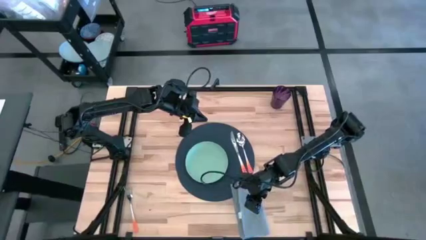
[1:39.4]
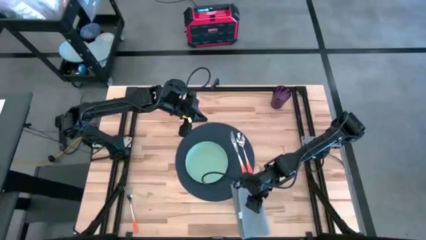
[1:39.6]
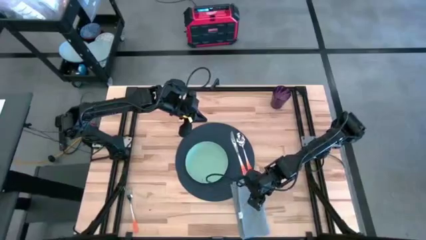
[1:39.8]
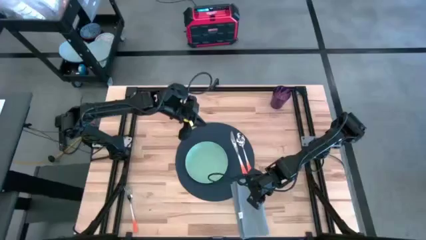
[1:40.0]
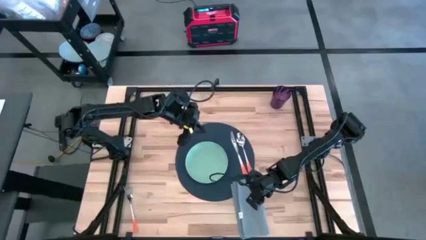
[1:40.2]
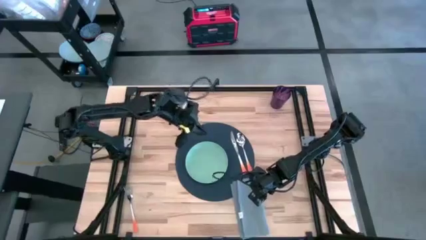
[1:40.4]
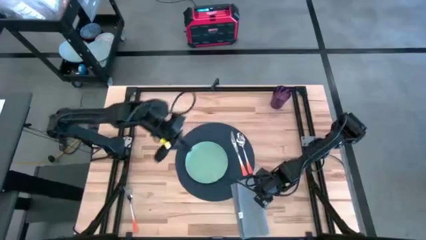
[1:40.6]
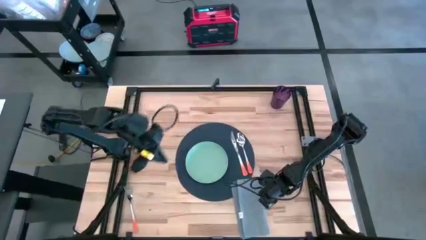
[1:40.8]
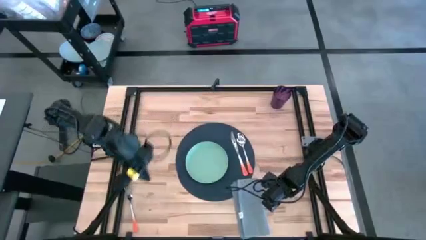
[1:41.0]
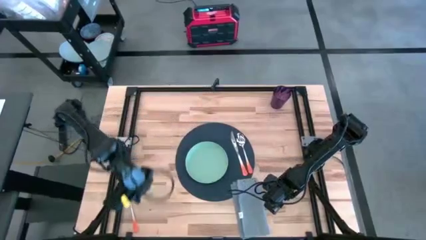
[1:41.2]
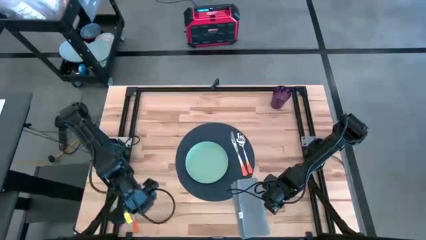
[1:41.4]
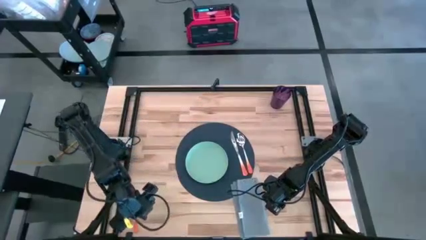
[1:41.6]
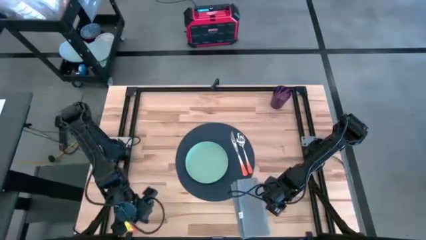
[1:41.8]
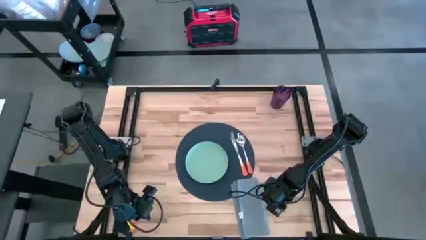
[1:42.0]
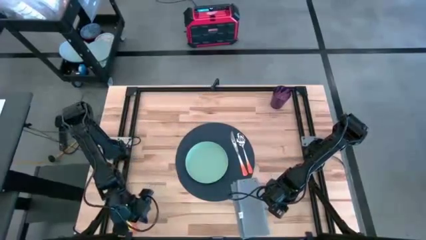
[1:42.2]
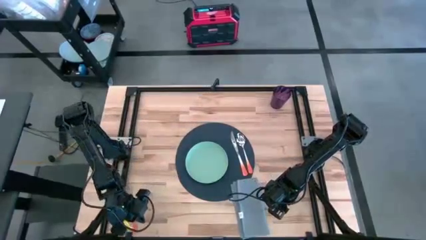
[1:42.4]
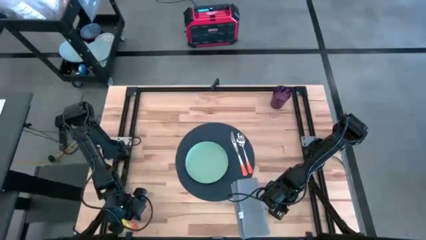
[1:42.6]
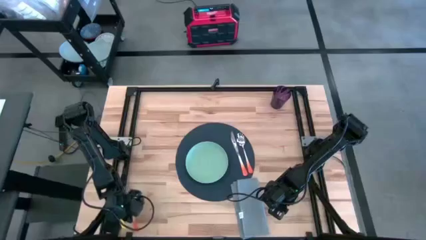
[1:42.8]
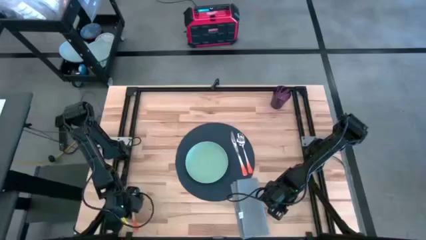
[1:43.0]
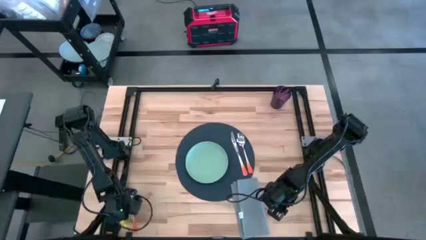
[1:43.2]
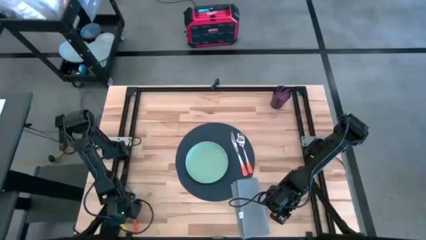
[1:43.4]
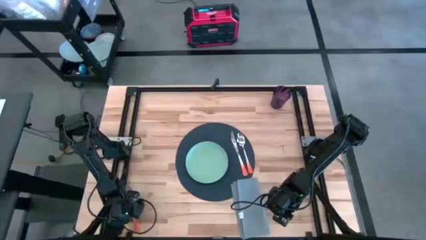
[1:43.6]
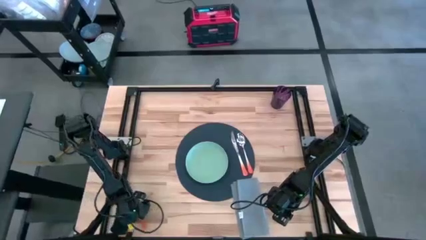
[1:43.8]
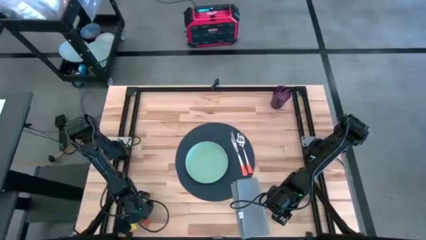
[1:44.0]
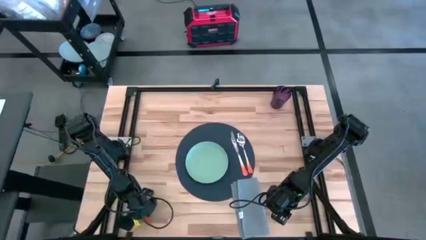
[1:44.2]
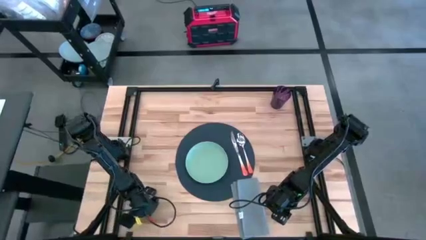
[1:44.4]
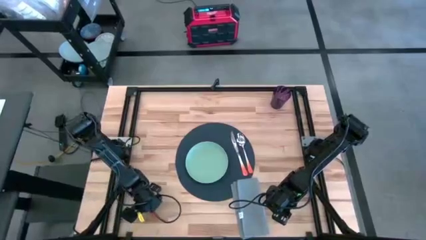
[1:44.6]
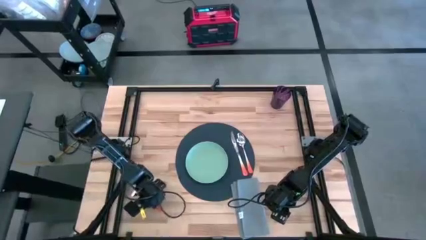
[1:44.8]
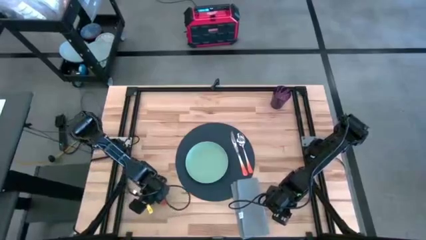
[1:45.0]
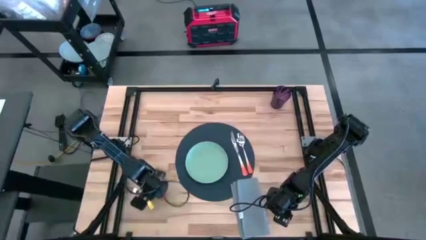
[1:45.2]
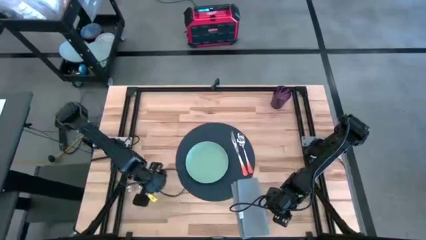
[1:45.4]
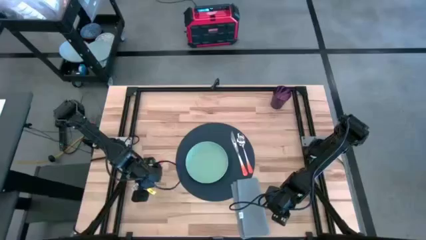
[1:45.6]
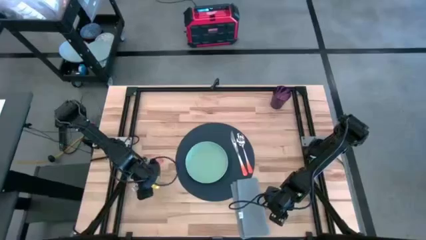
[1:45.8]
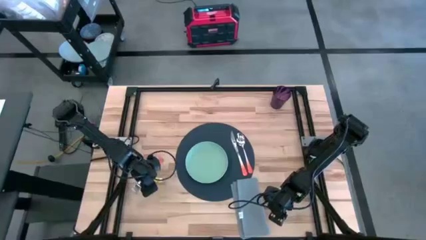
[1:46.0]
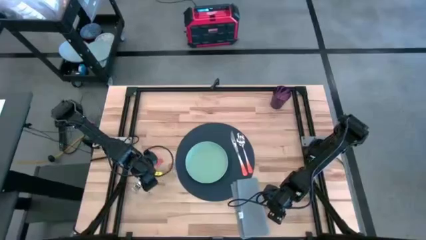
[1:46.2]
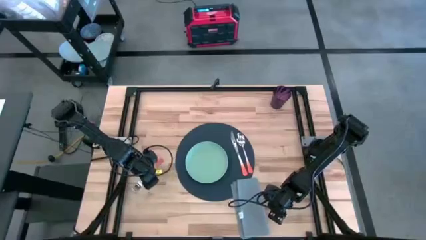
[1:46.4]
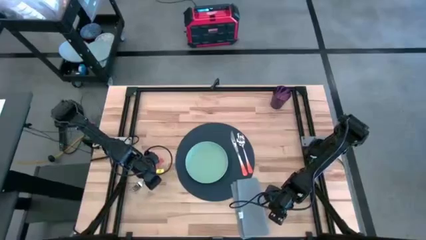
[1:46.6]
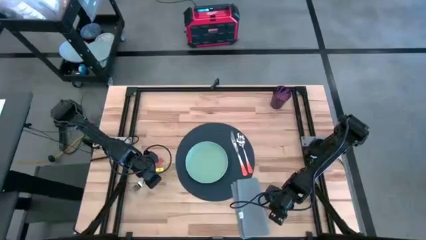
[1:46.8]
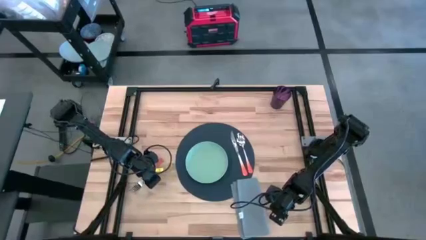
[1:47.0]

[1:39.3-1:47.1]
Task: Set table place
Put the orange fork on the gray table napkin

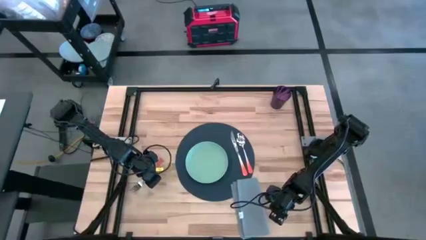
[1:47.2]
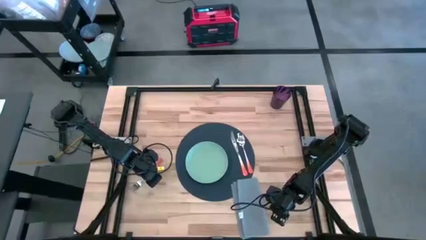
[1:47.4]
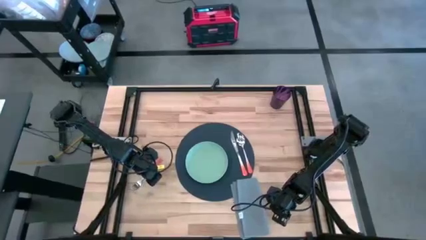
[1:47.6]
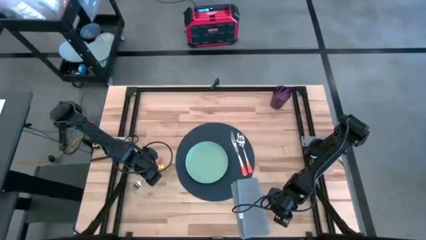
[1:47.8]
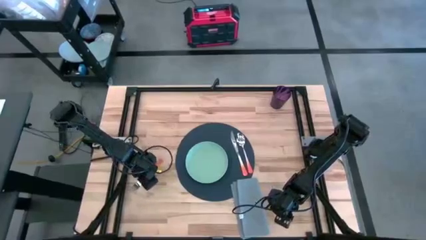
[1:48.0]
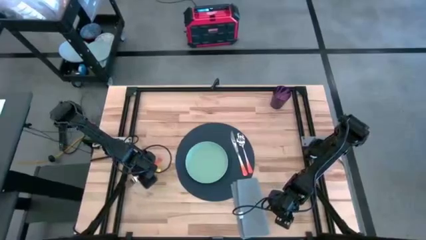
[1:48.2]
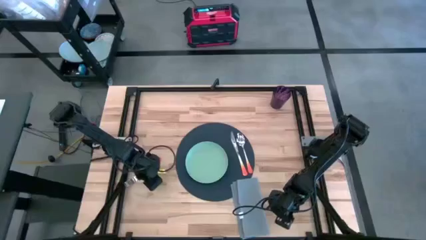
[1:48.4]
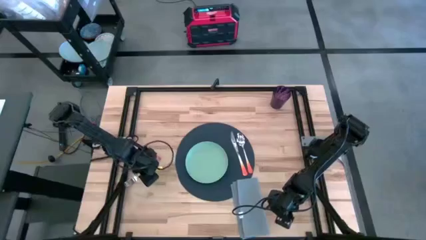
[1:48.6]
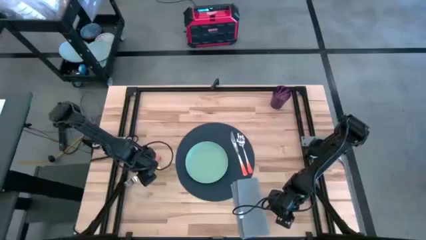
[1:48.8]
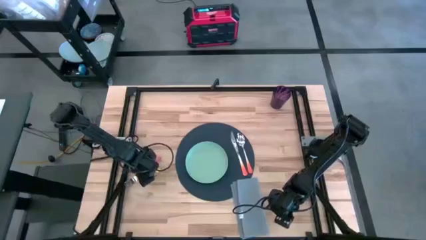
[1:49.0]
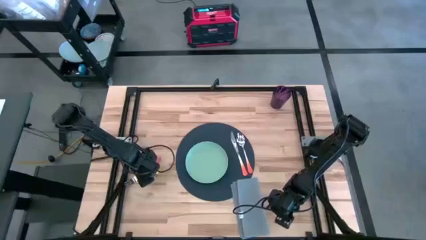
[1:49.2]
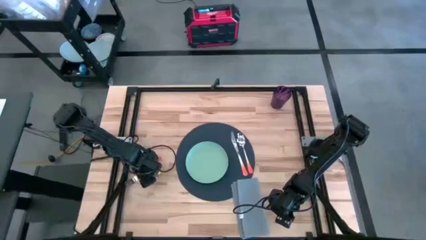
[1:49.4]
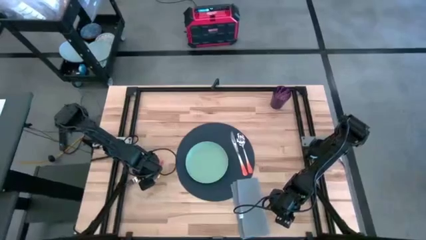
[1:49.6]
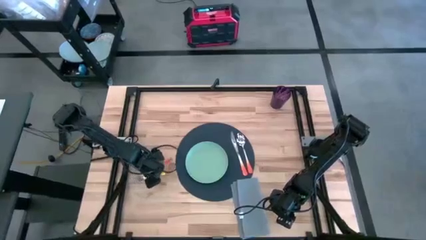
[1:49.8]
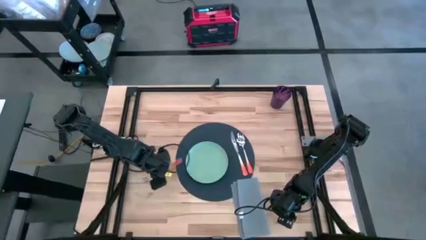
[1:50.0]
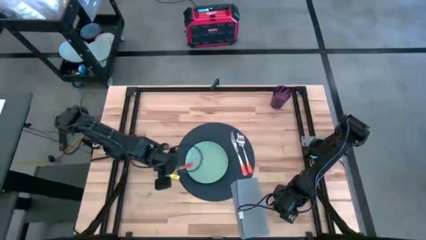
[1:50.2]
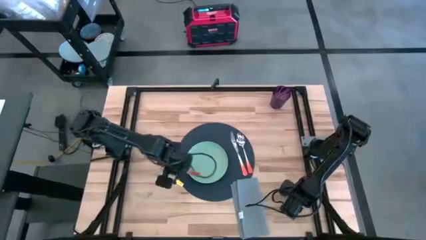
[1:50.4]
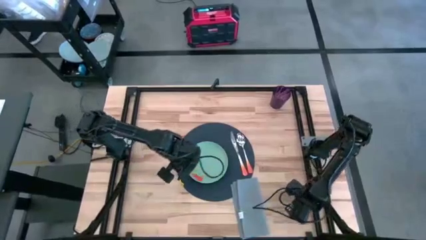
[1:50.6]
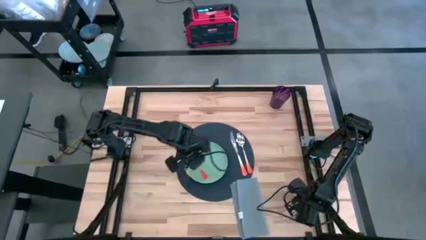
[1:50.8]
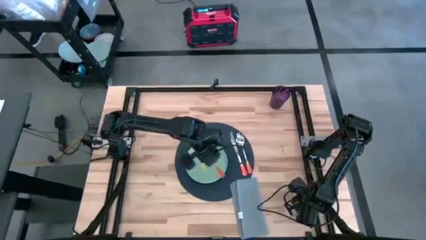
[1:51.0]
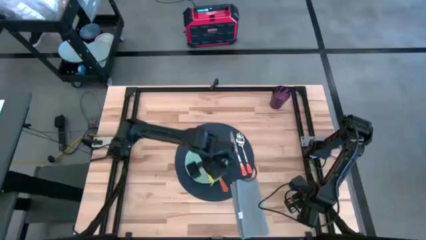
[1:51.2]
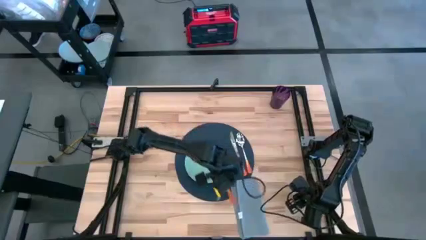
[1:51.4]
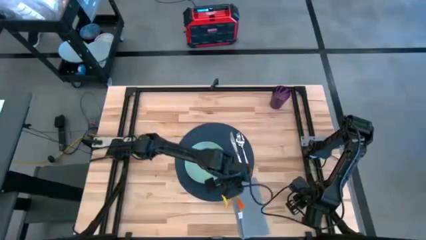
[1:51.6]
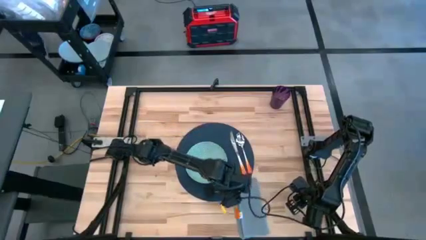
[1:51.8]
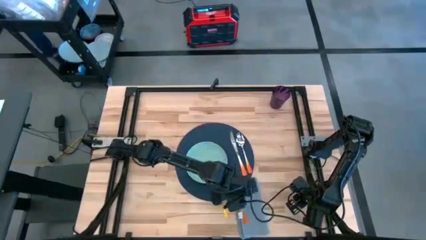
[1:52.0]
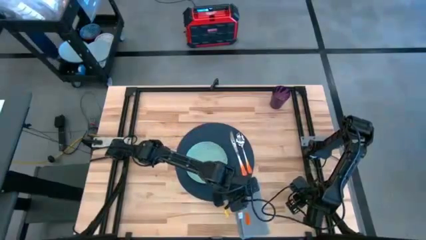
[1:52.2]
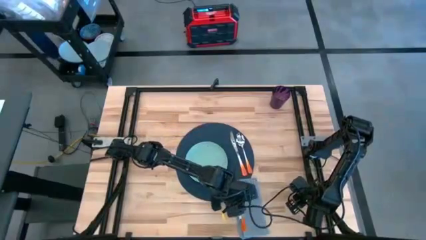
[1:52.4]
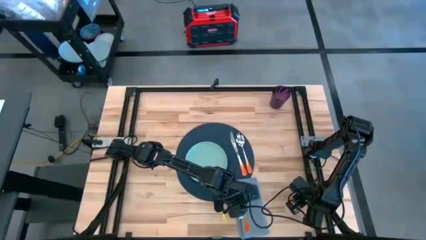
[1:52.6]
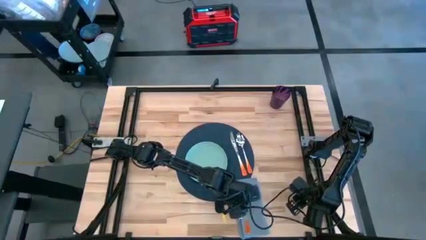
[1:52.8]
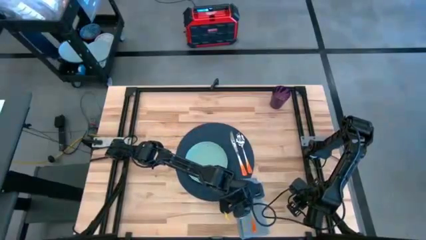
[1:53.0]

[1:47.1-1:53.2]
Put the orange fork on the gray table napkin

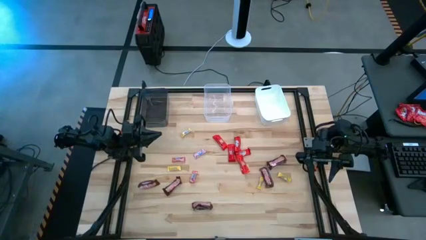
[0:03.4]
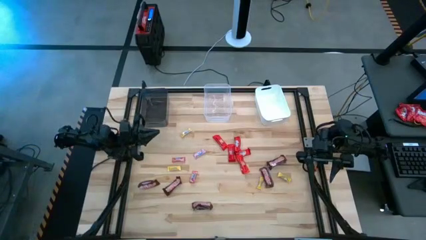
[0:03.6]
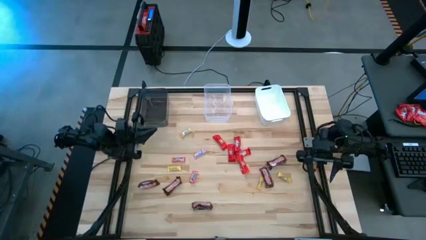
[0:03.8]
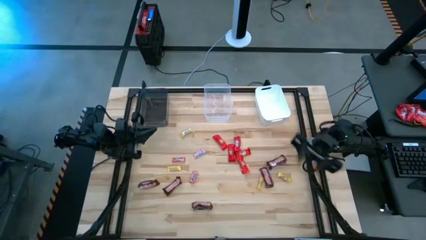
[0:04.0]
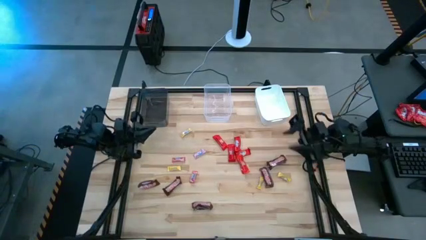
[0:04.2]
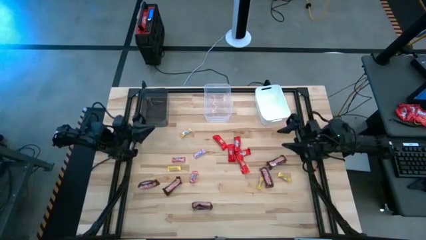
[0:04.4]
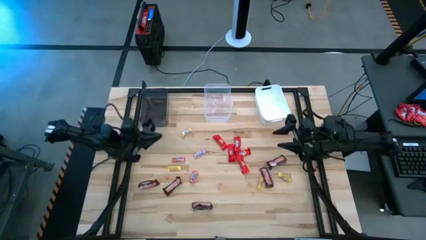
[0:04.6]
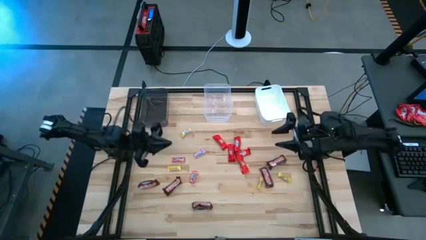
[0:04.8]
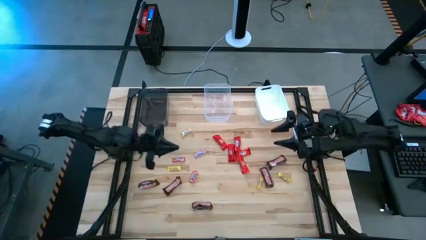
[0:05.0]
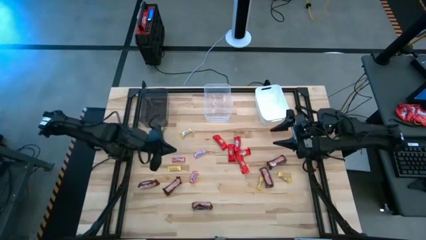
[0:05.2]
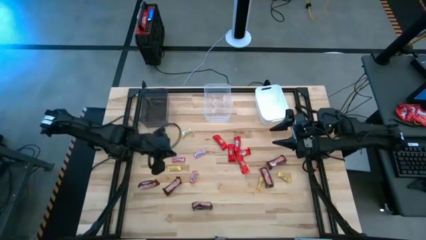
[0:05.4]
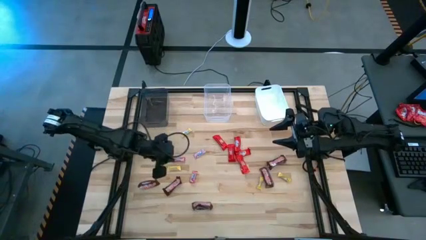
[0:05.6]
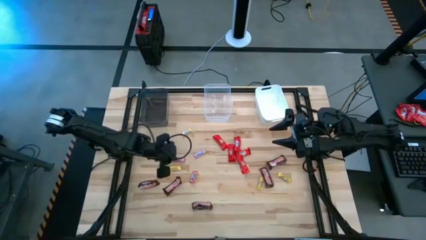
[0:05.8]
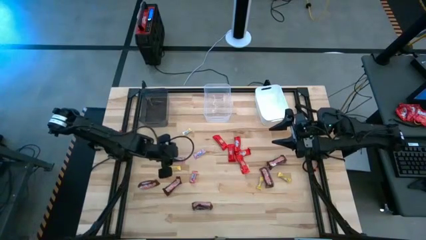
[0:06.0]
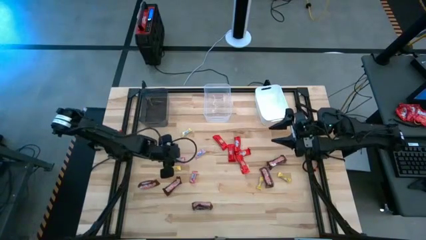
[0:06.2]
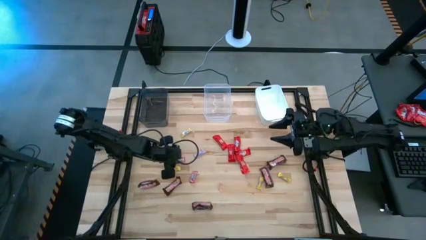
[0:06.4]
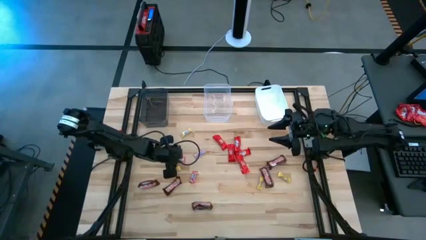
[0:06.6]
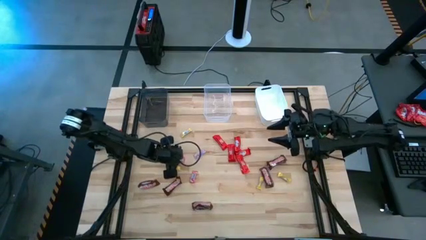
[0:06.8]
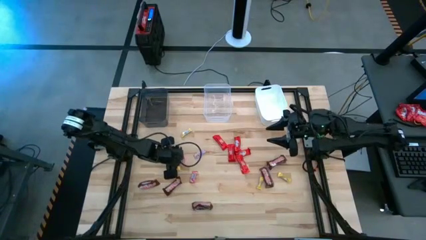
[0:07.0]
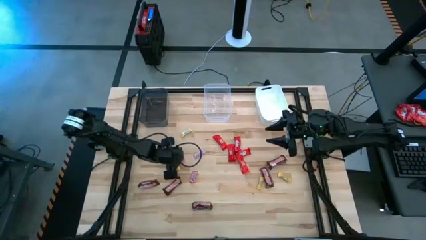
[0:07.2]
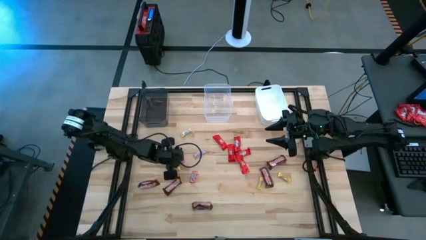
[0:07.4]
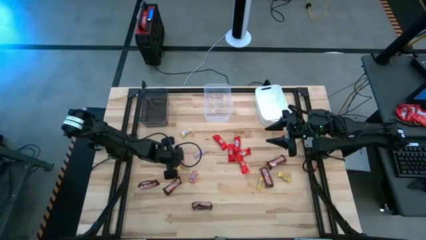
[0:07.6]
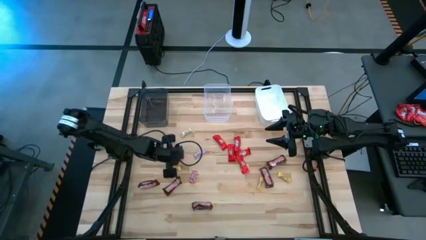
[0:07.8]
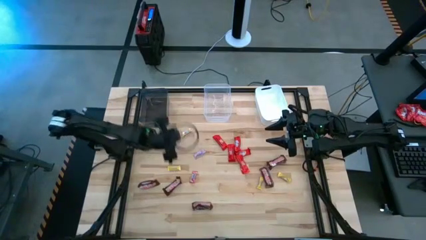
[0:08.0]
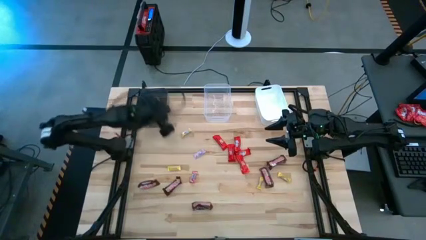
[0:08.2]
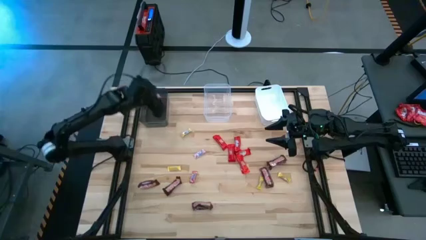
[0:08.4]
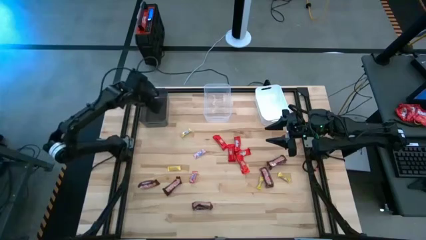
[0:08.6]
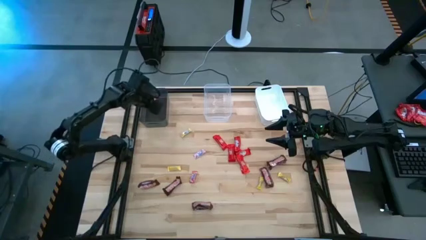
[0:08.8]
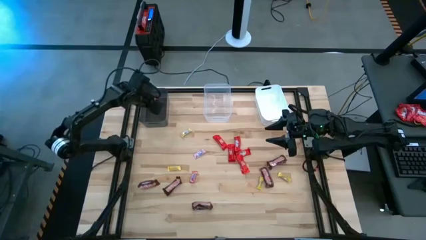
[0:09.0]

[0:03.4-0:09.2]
Task: Sort candy by brand, put in halloween buckets
Put the light red candy into the black bin
